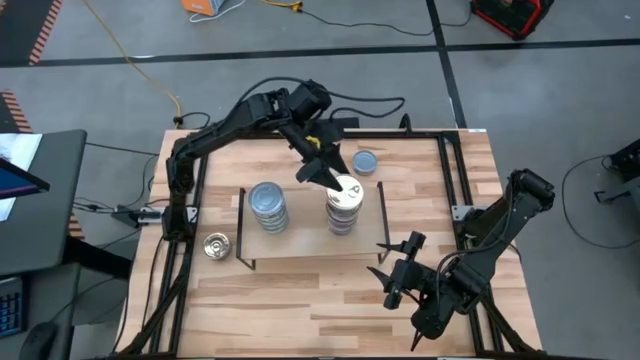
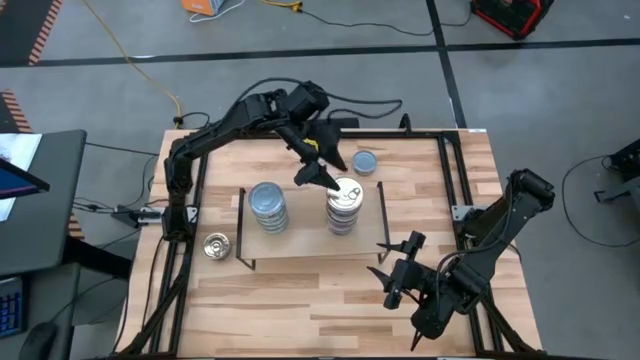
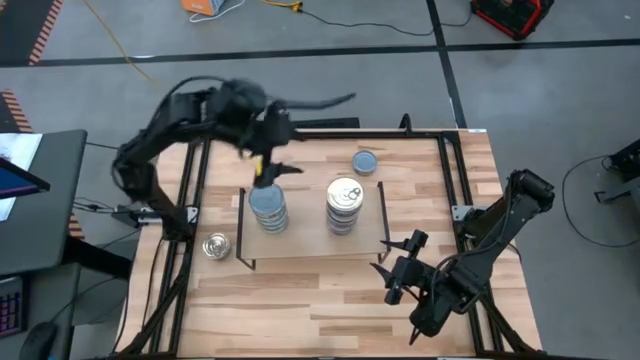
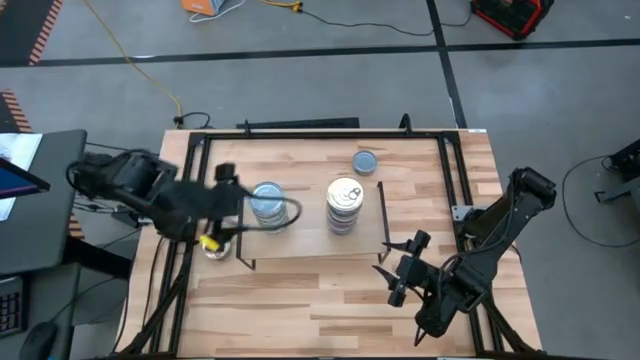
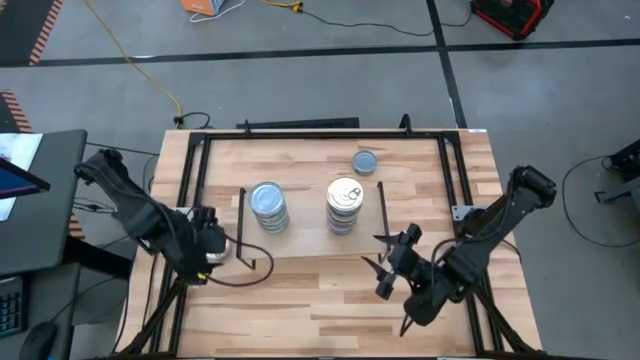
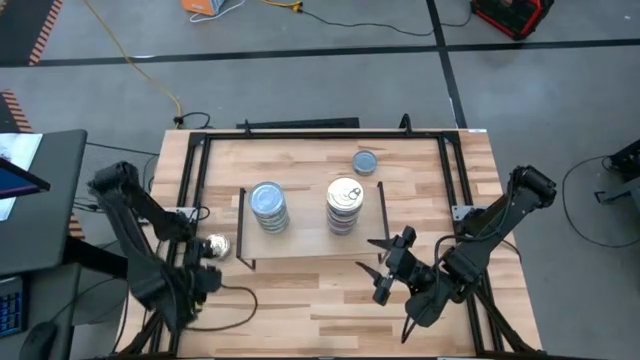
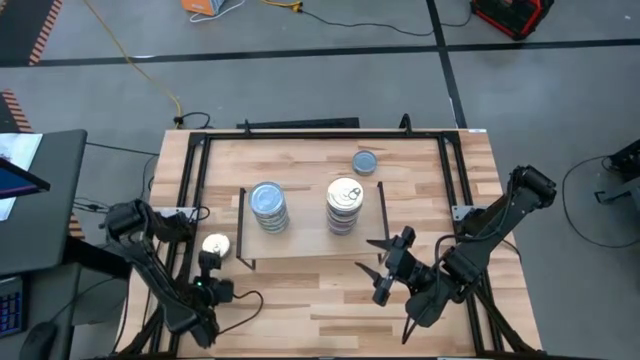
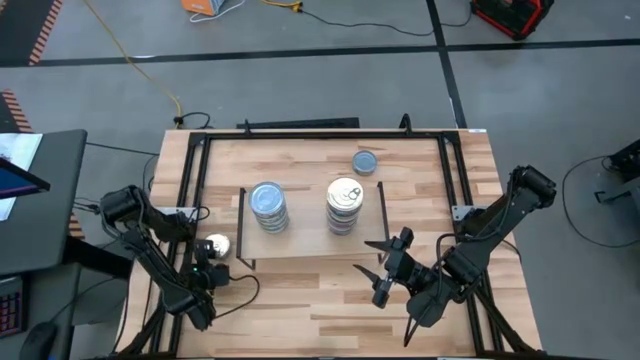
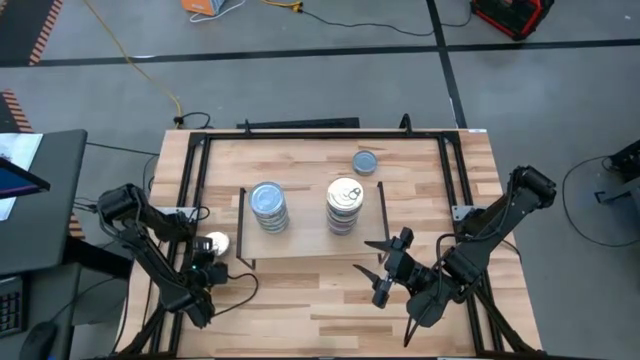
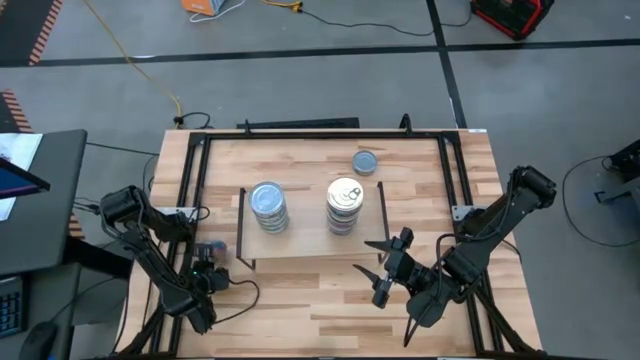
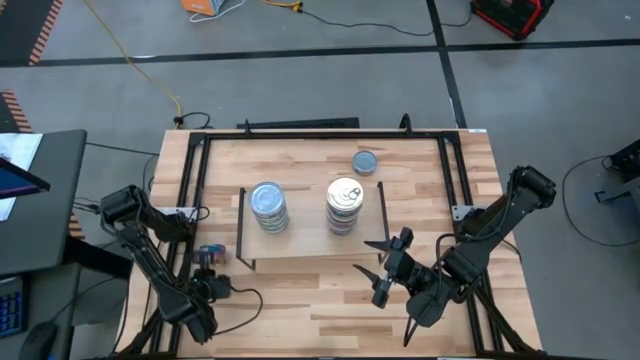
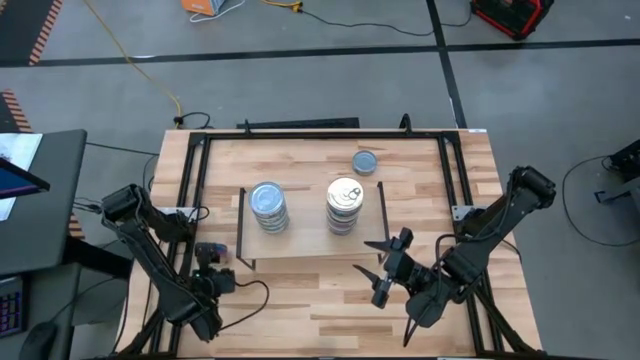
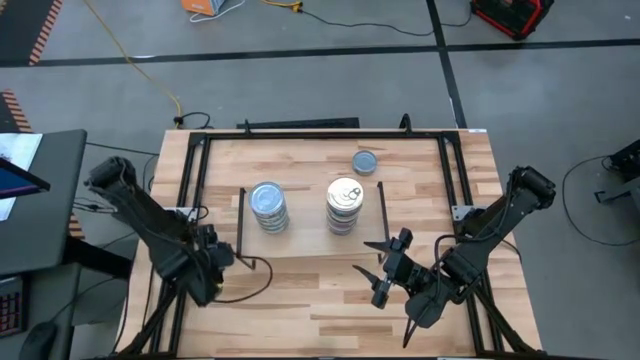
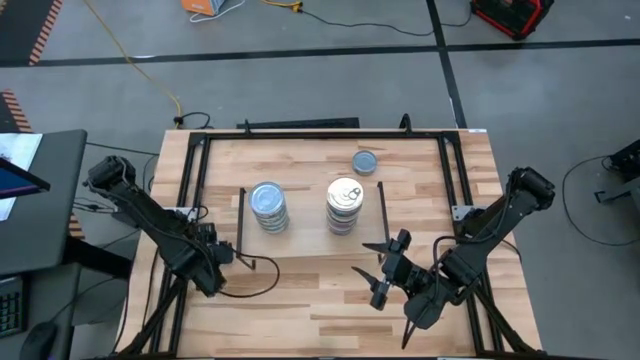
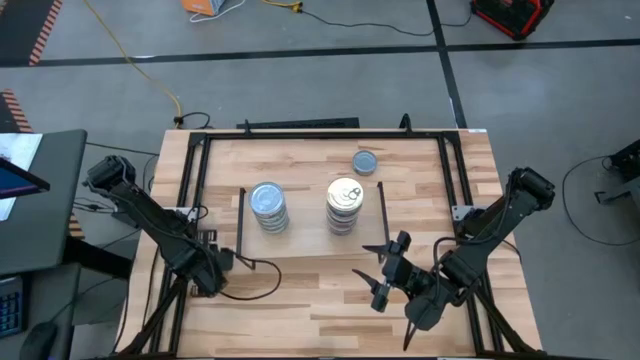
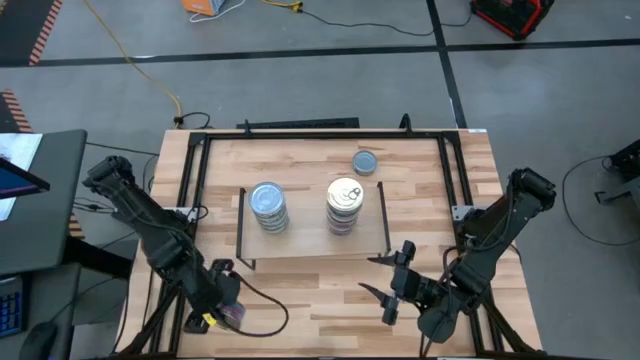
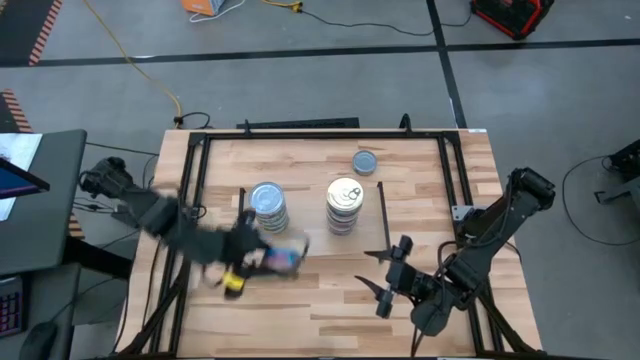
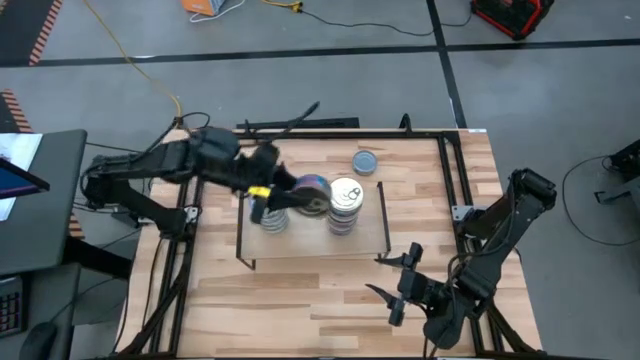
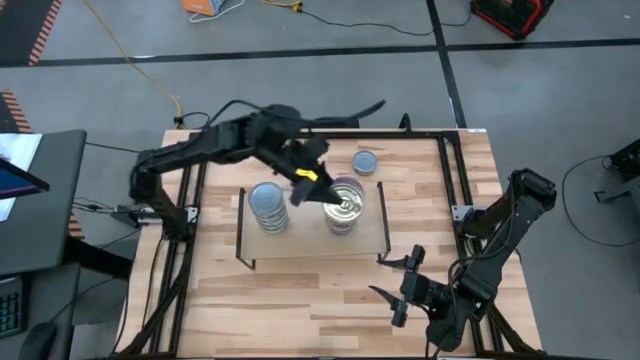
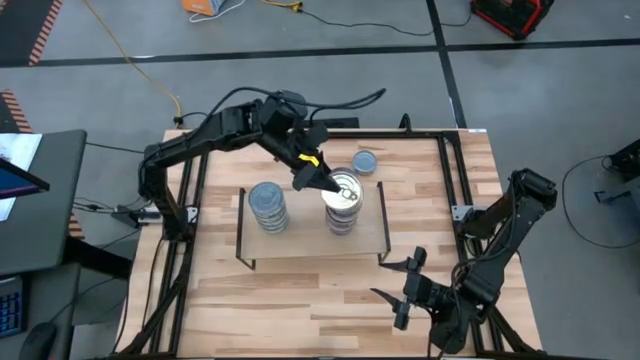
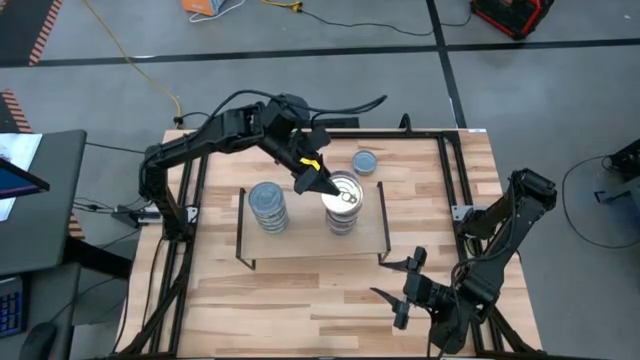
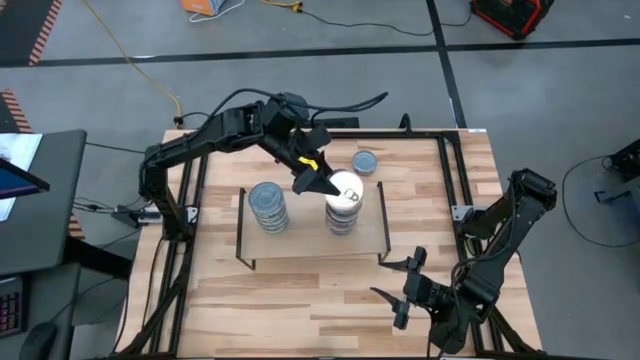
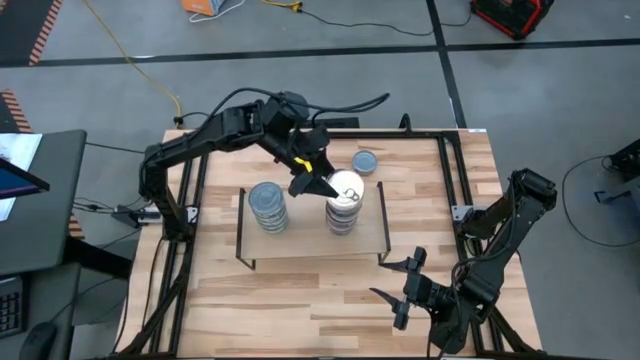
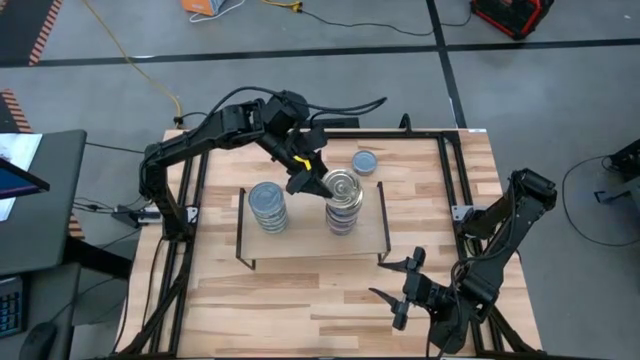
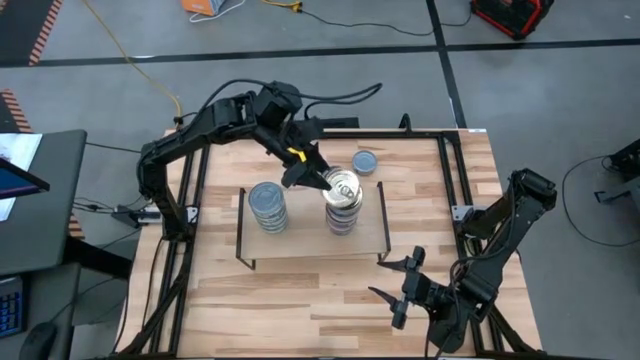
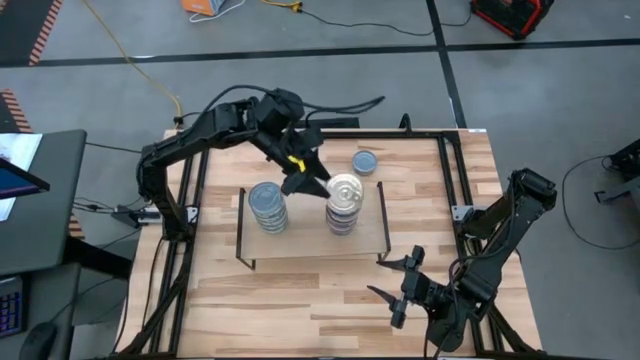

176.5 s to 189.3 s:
Task: Stack canned seafood by type on shelf
Stack the blue tuna can on top of the blue tuna can on the shelf

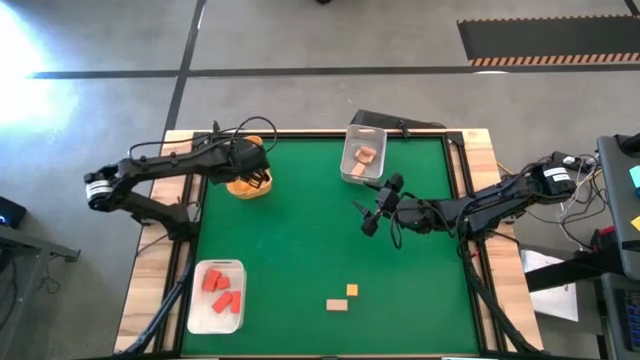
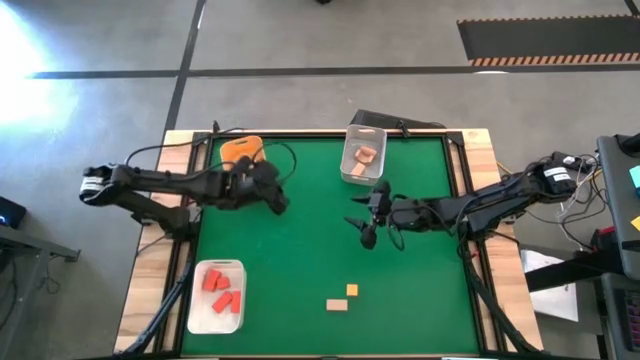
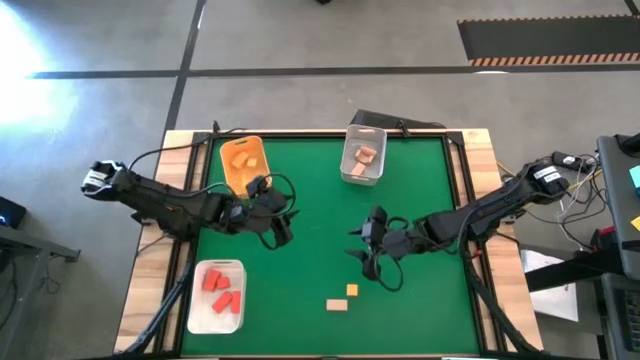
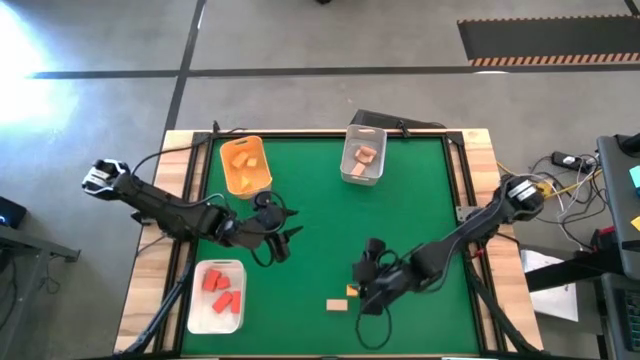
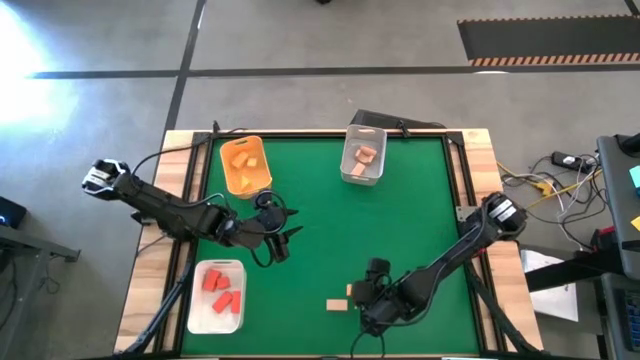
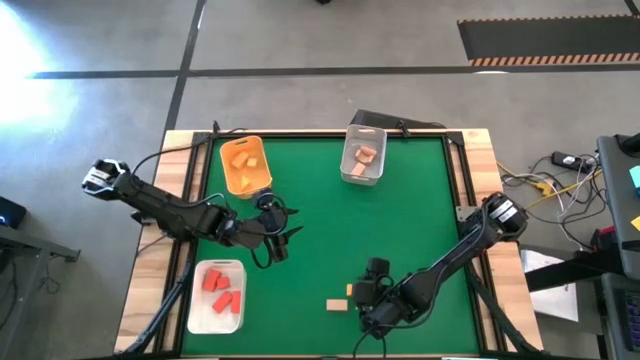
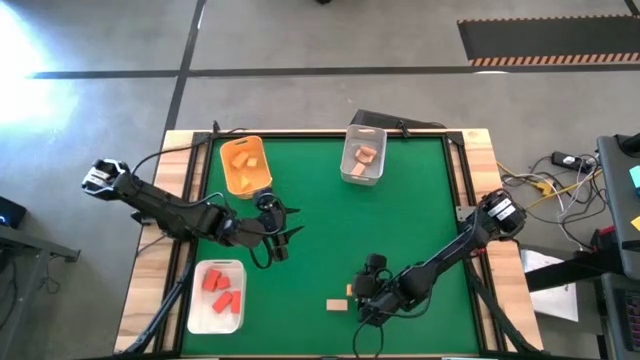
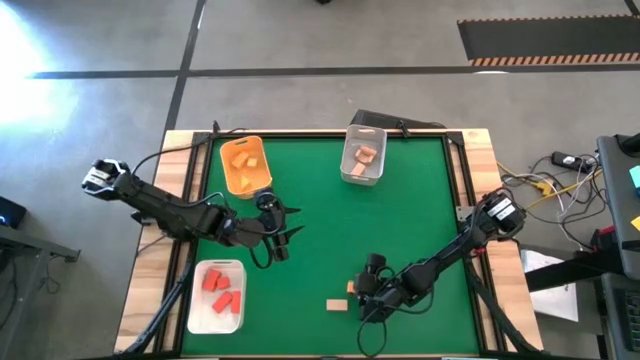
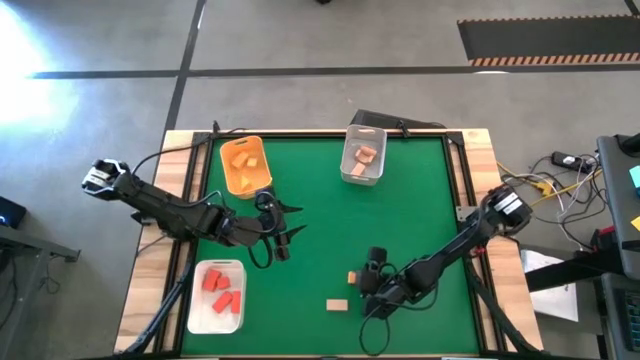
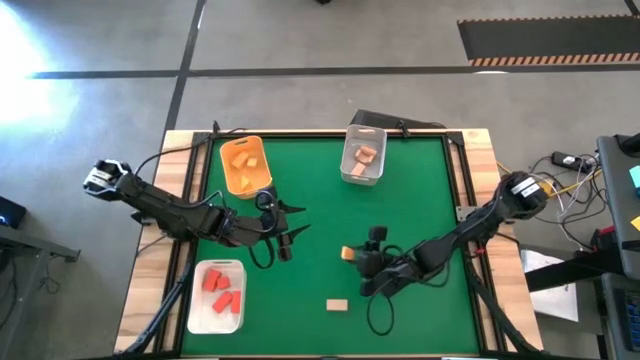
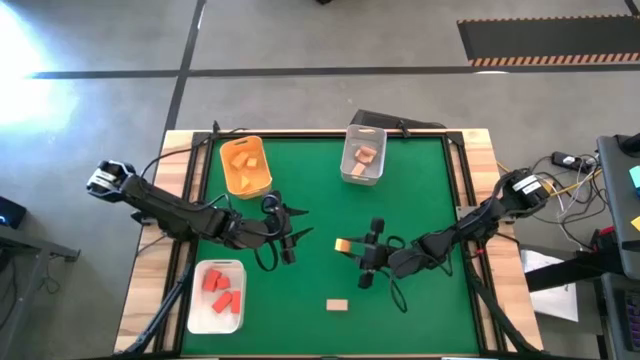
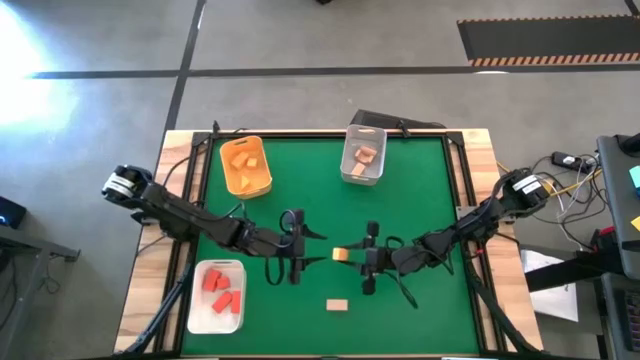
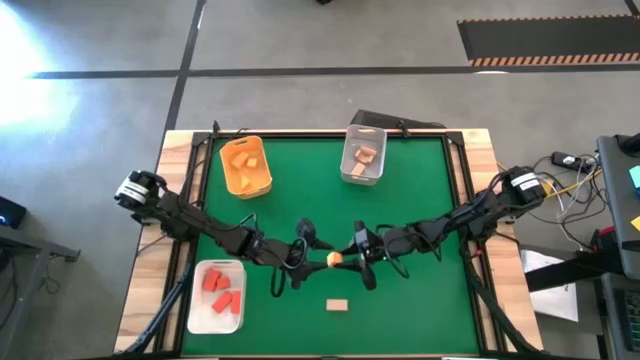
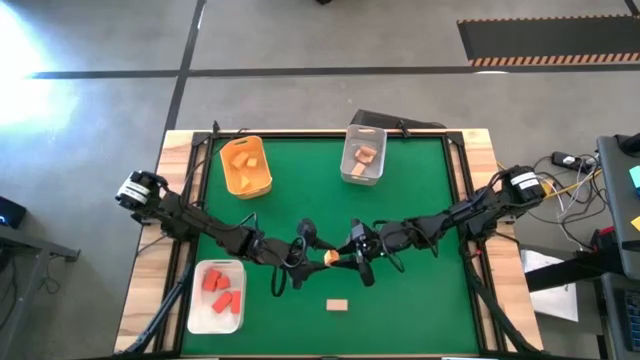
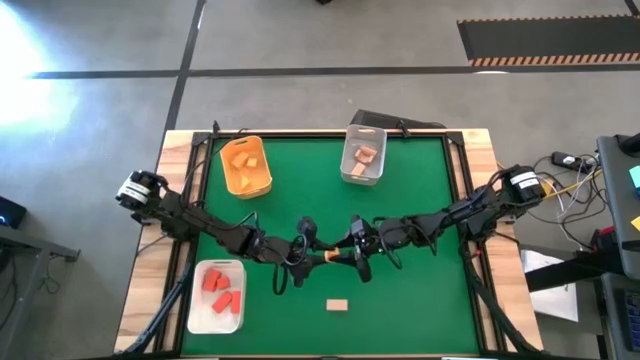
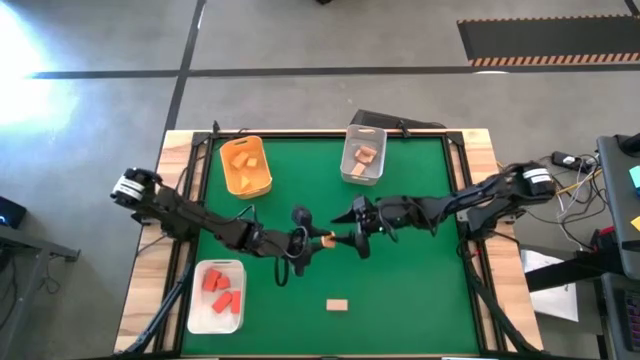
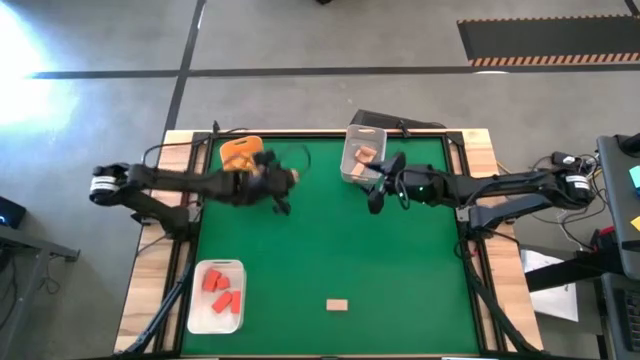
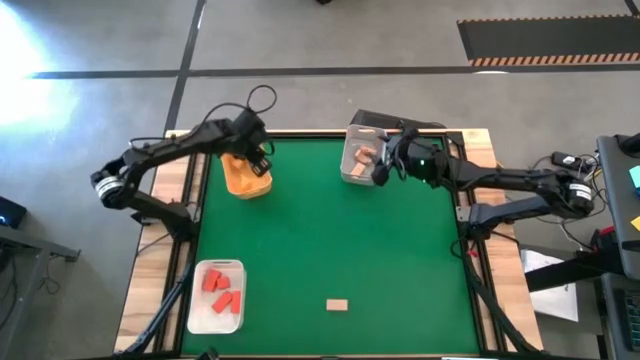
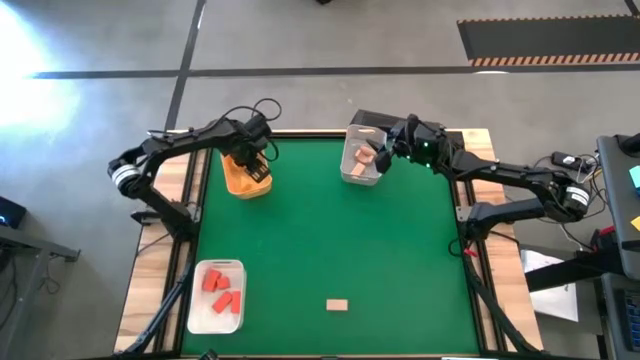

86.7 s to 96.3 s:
Task: Sort & place blocks by color
Put the yellow block into the yellow bin
